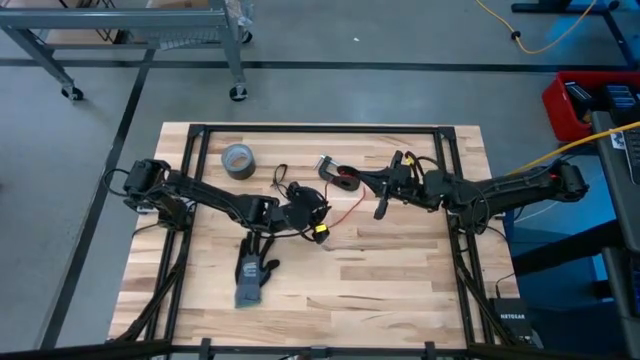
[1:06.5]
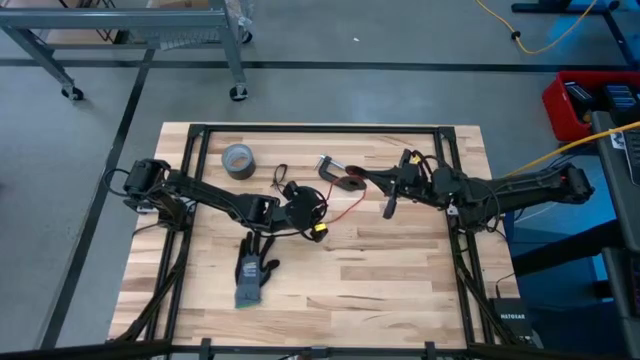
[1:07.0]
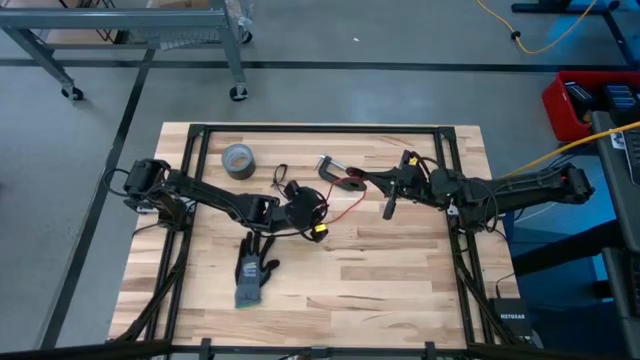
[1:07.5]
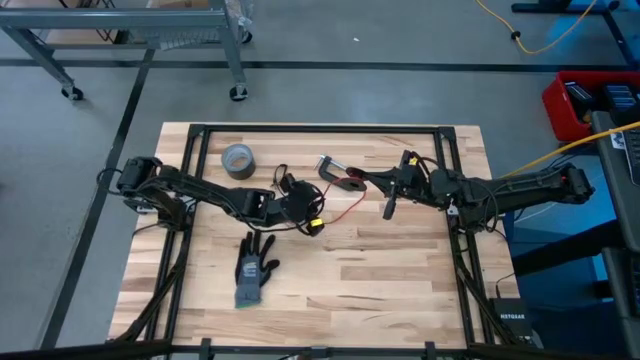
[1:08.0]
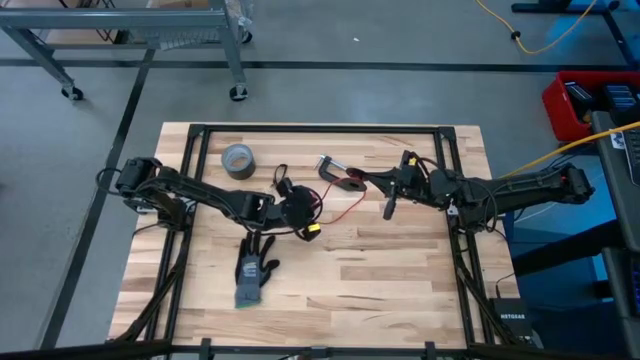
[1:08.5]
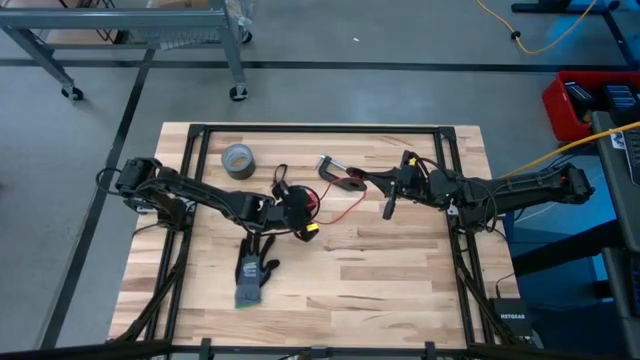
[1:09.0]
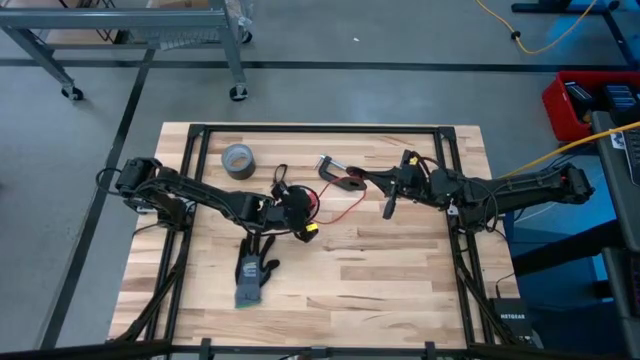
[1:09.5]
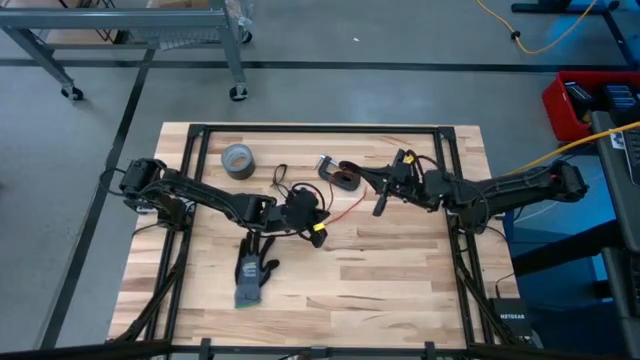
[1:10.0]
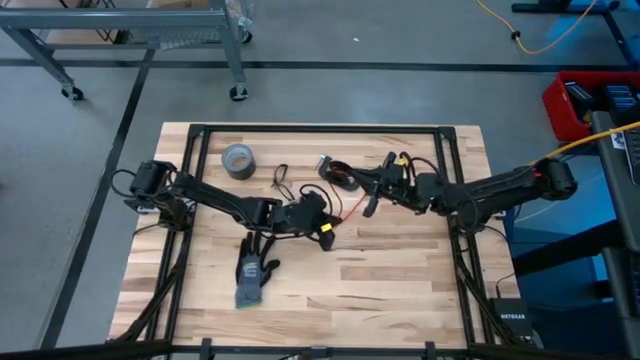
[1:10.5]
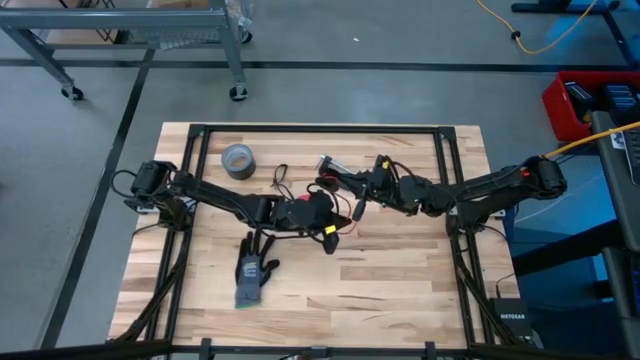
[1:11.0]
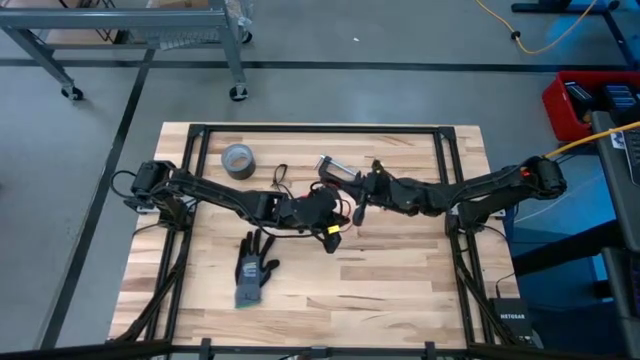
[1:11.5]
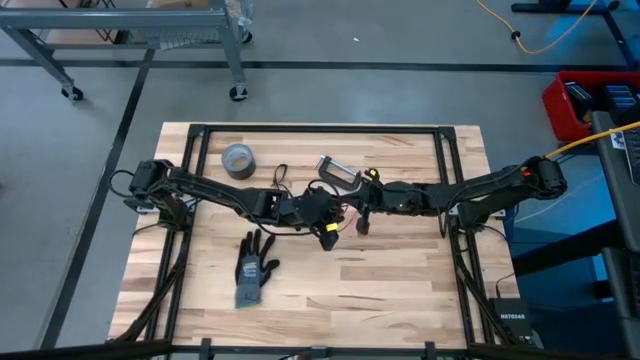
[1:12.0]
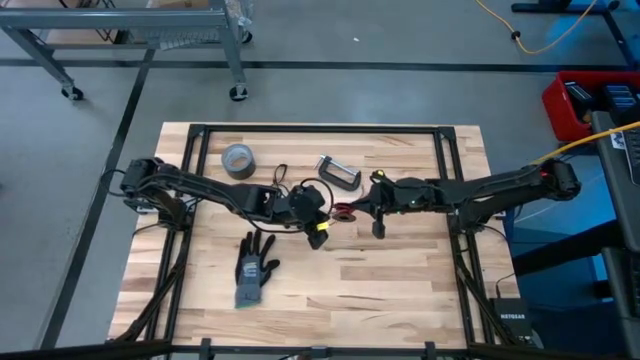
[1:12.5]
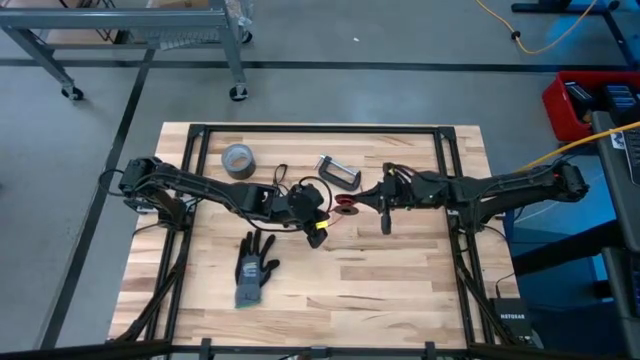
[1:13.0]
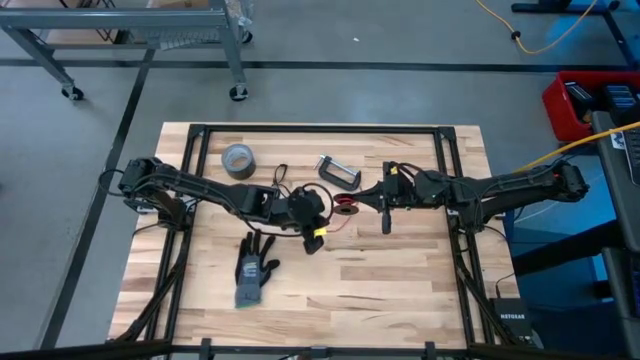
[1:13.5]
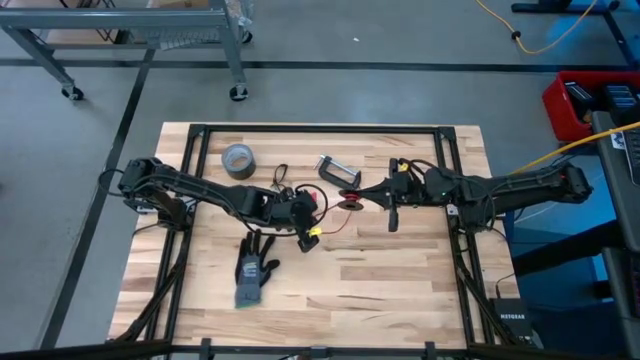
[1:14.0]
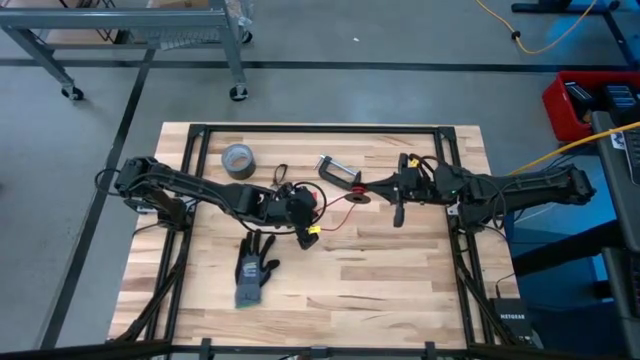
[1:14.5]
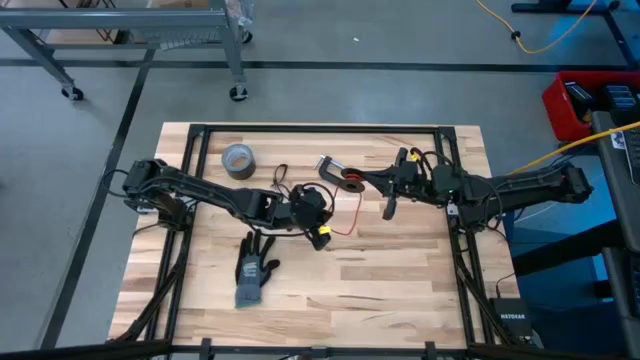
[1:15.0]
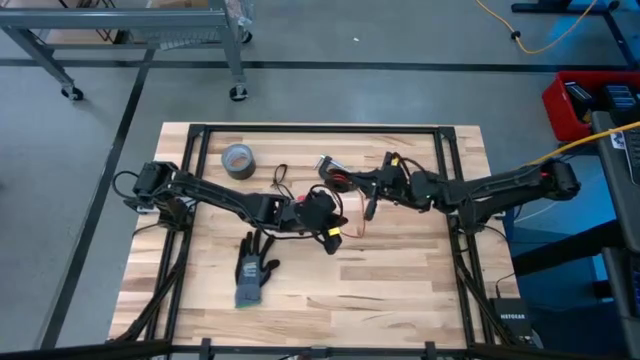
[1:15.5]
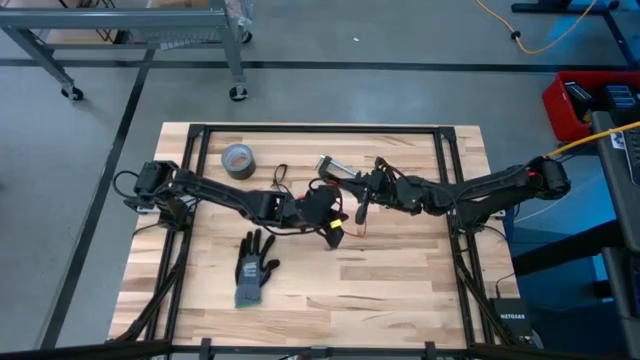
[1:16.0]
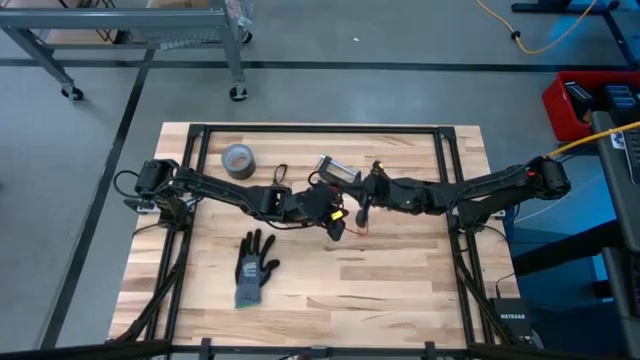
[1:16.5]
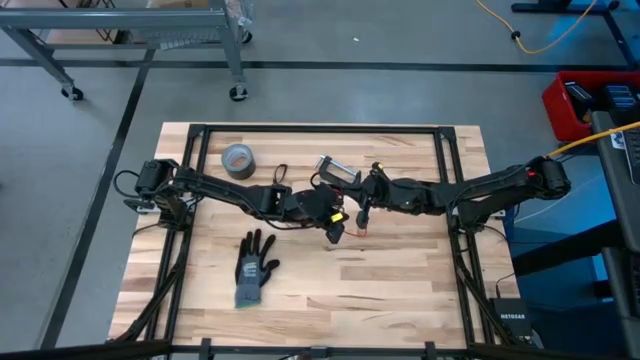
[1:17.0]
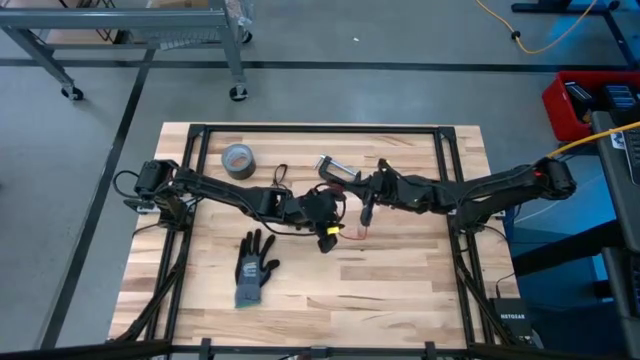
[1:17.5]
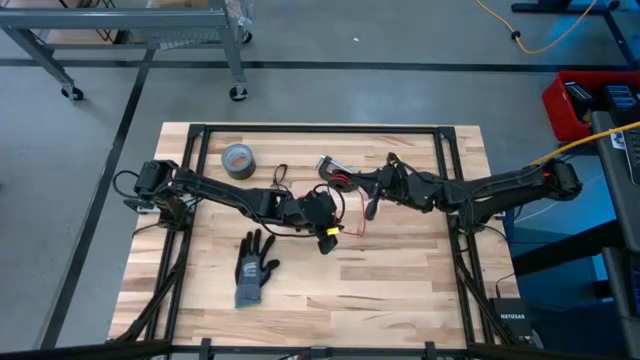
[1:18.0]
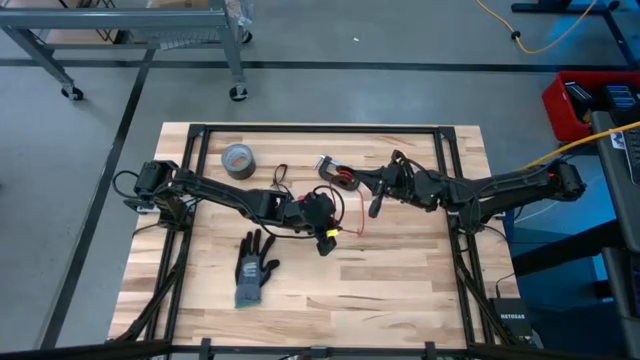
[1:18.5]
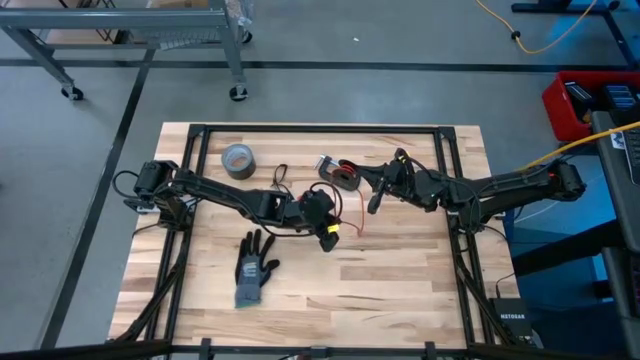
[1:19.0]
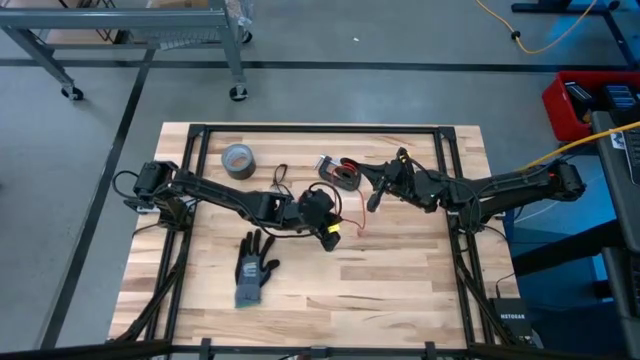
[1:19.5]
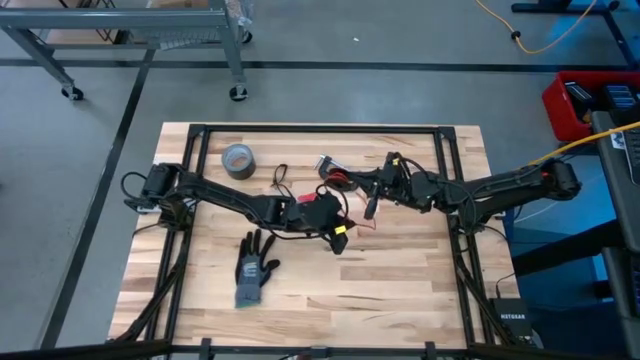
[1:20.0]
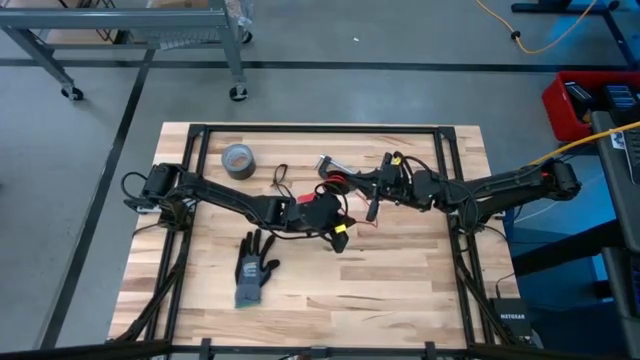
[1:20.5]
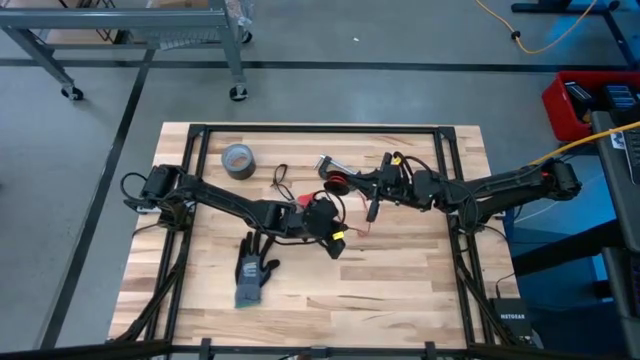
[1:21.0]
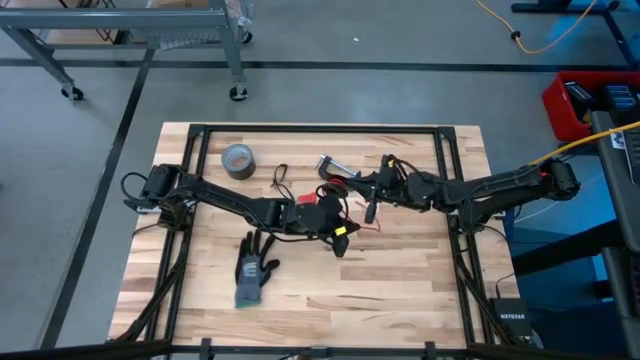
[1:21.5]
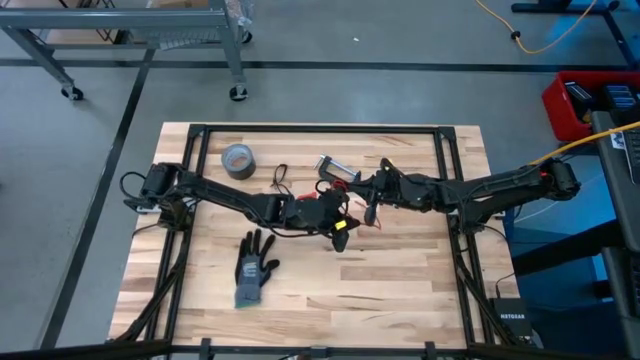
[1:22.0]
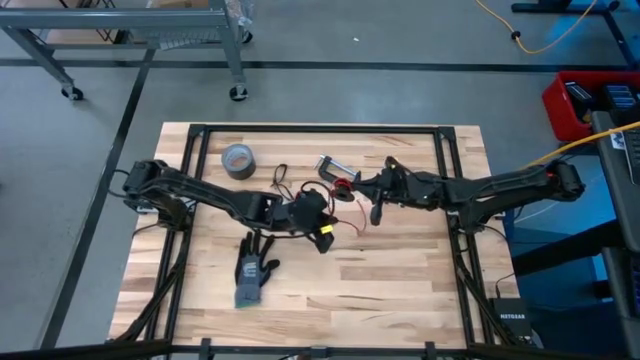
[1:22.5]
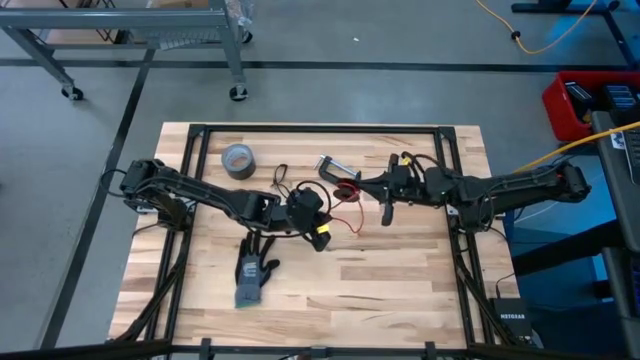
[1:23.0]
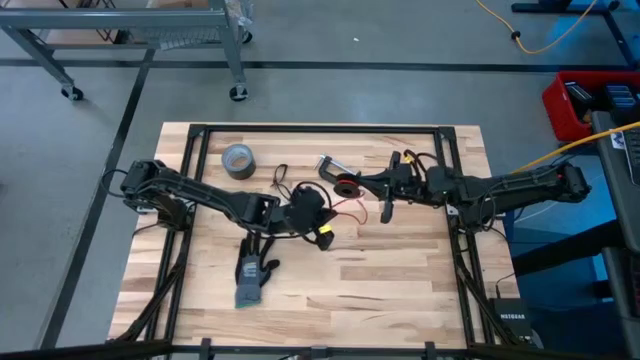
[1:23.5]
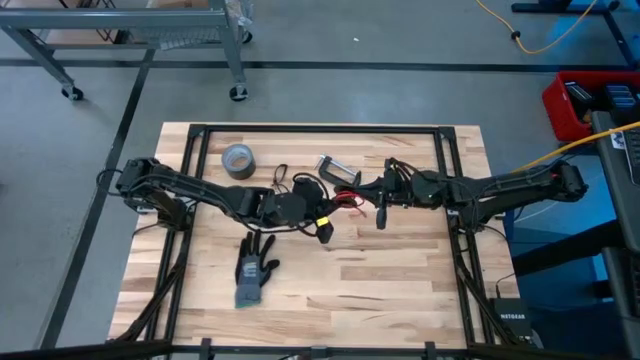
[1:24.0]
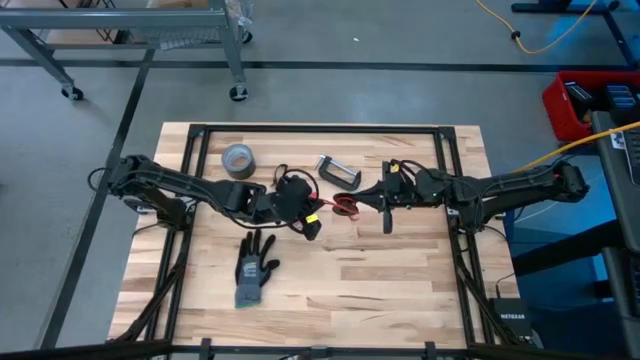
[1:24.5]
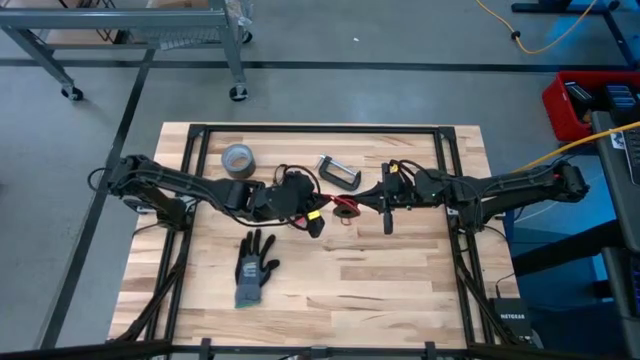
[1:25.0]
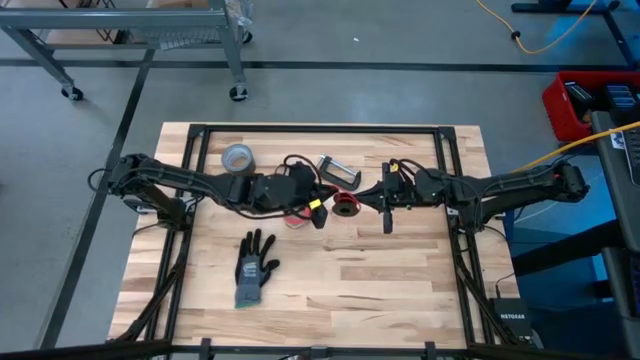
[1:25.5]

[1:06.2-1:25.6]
Task: Coil cords
Coil the red wire onto the spool
